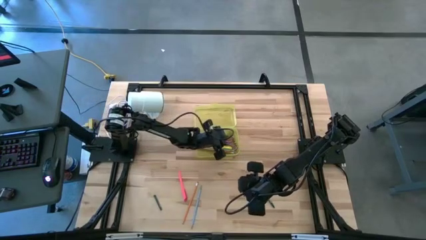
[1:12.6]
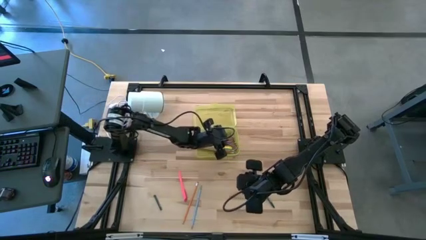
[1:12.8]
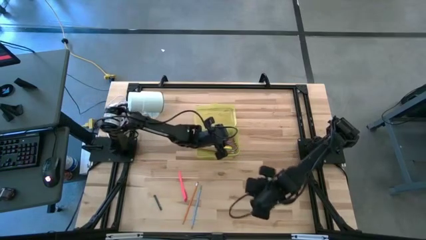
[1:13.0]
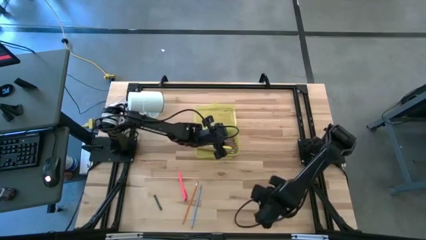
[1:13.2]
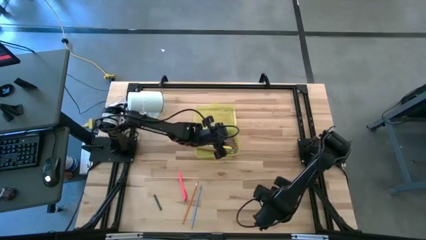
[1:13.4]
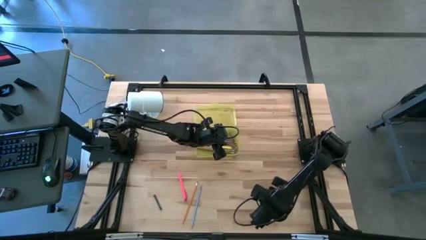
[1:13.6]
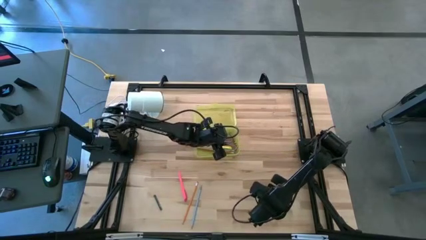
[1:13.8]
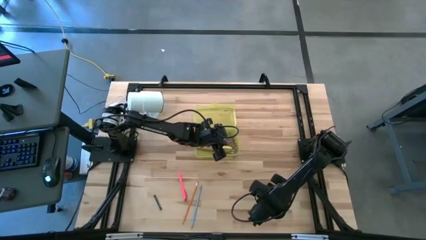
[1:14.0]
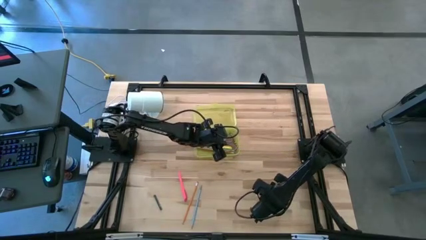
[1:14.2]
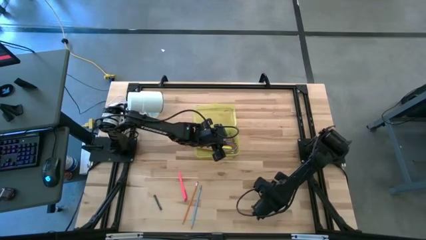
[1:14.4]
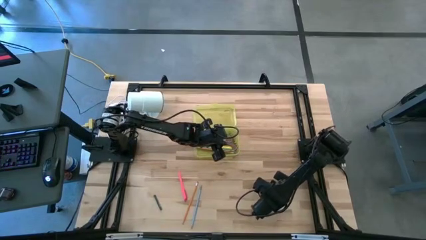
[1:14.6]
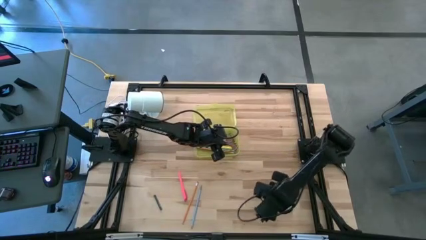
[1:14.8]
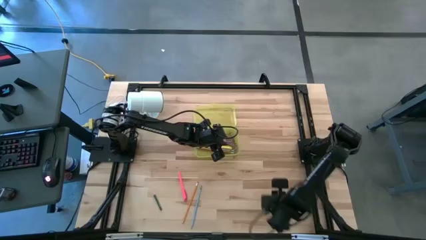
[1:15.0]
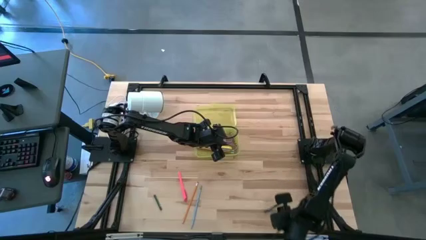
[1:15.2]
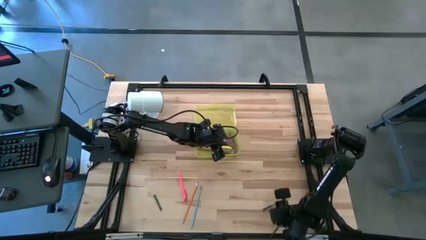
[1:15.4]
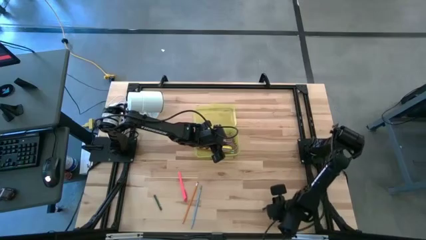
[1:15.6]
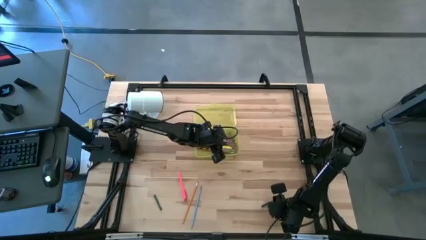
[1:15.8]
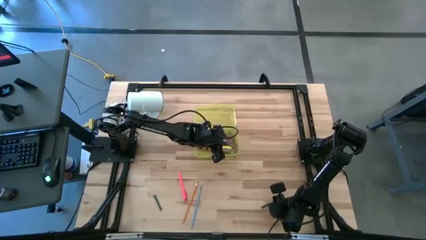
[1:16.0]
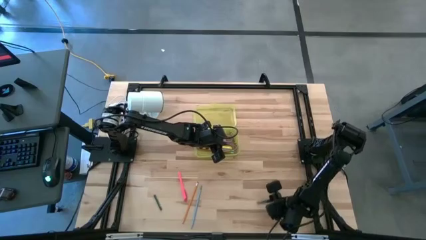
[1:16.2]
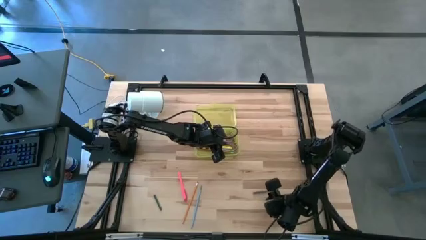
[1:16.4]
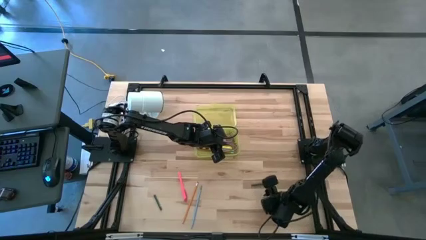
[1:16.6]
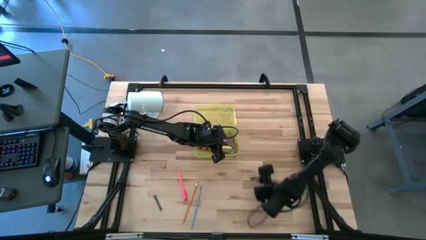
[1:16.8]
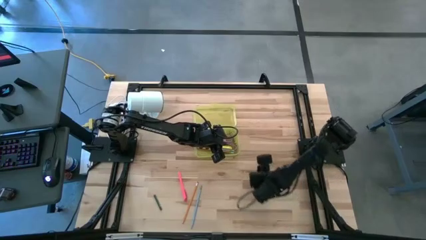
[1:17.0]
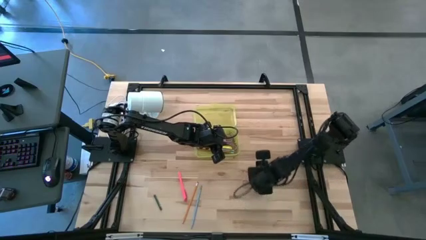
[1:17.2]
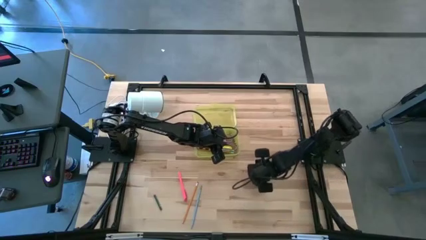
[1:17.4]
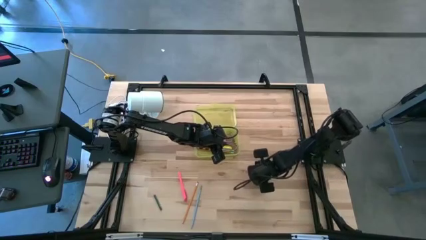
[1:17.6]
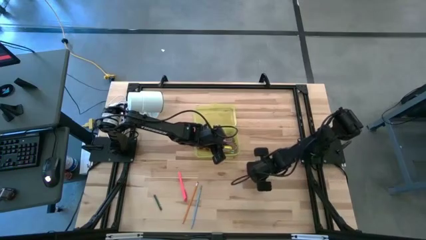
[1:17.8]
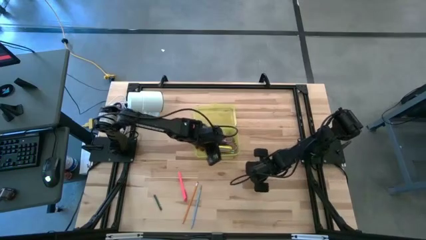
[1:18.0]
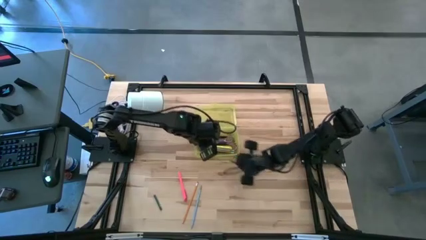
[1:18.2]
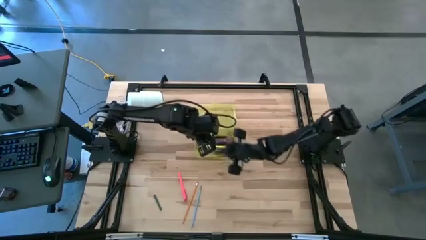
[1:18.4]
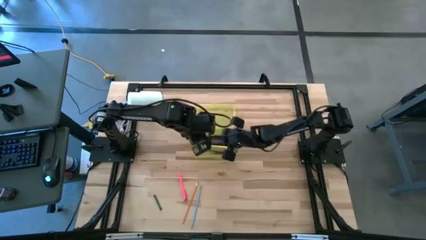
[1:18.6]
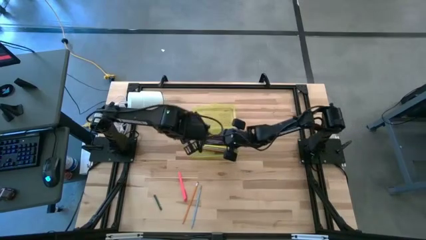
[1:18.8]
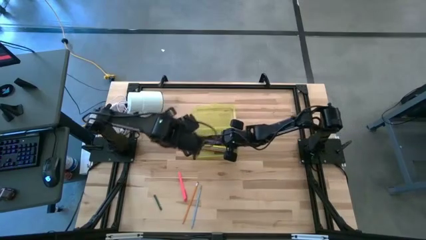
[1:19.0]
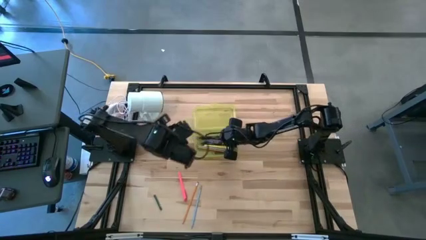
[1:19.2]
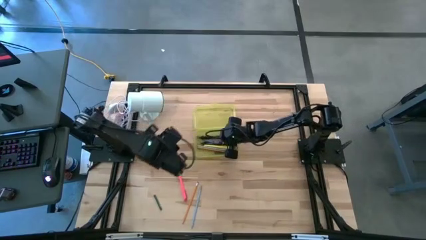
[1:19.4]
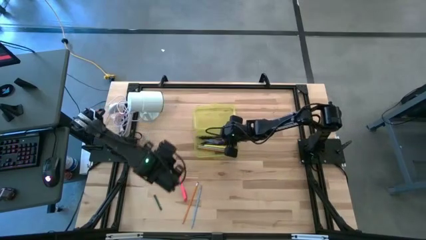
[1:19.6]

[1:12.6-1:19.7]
Task: Pick & place school supplies into a supply box
Put the dark green crayon into the supply box

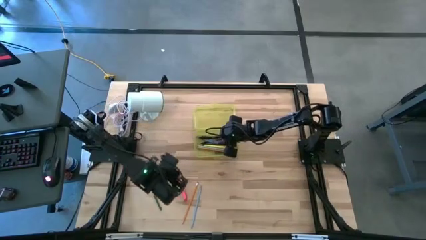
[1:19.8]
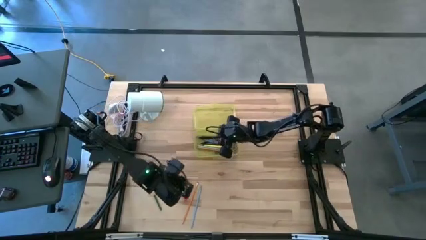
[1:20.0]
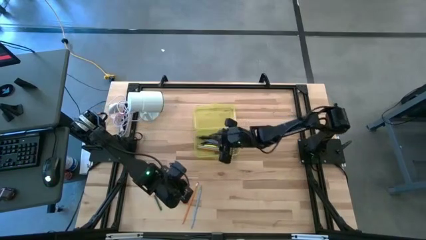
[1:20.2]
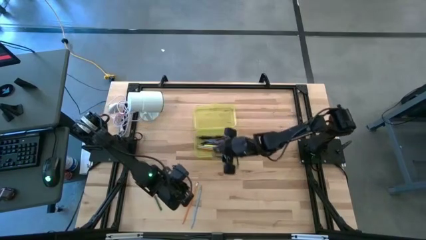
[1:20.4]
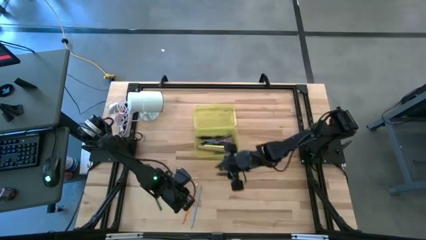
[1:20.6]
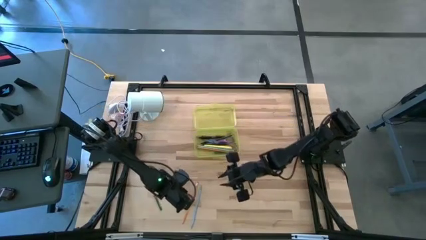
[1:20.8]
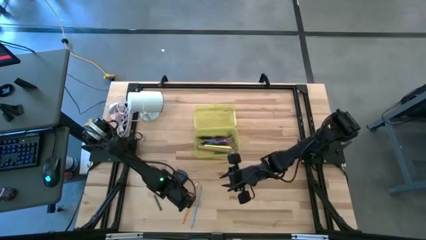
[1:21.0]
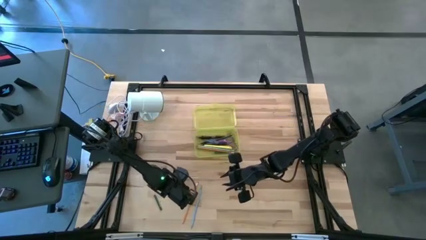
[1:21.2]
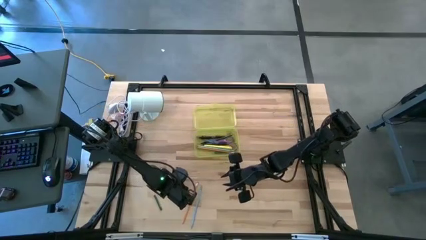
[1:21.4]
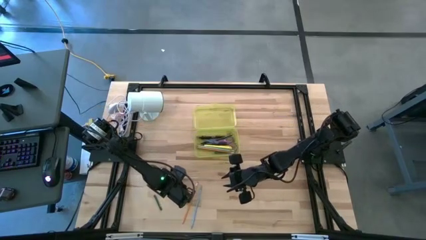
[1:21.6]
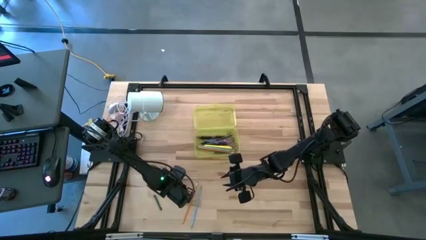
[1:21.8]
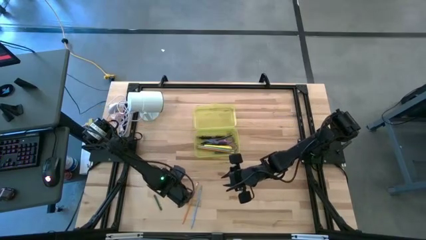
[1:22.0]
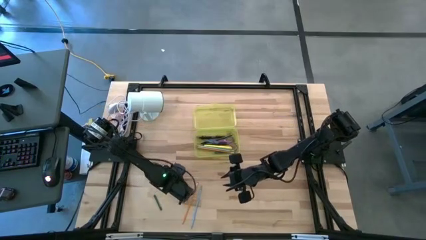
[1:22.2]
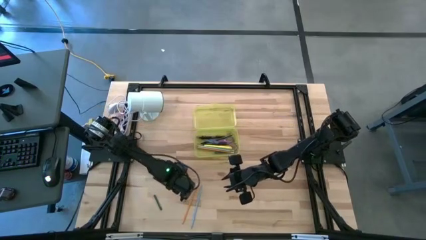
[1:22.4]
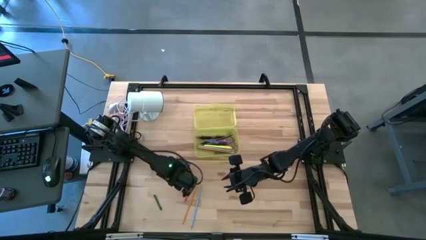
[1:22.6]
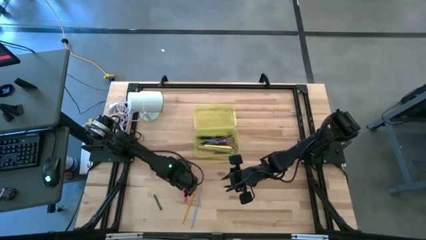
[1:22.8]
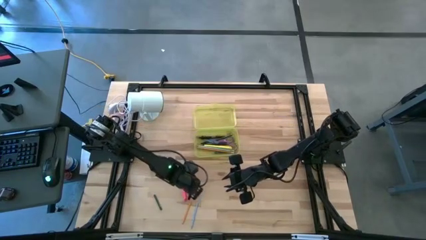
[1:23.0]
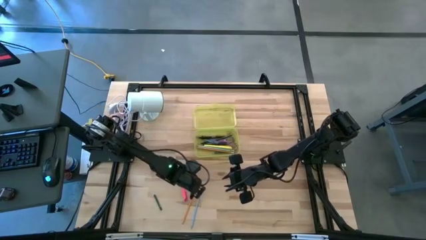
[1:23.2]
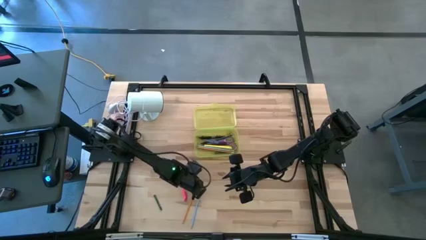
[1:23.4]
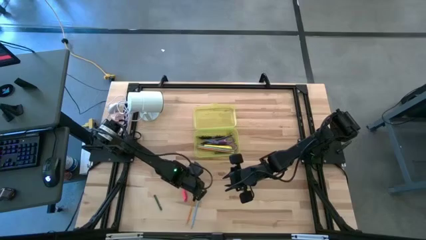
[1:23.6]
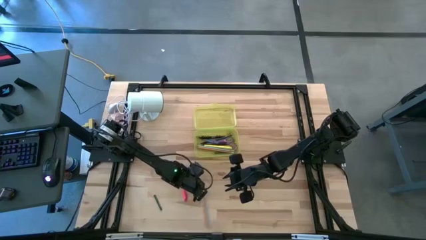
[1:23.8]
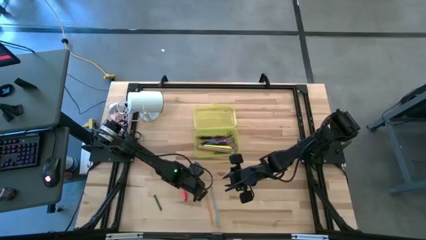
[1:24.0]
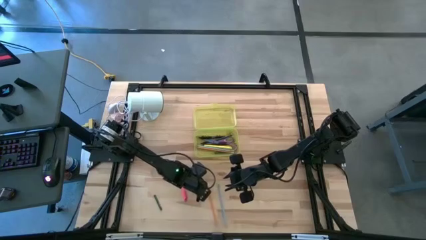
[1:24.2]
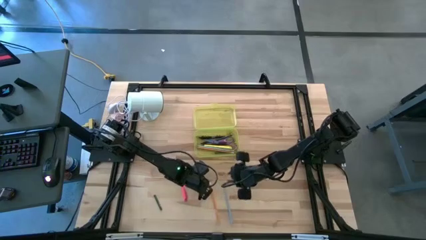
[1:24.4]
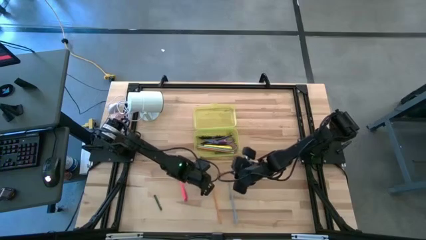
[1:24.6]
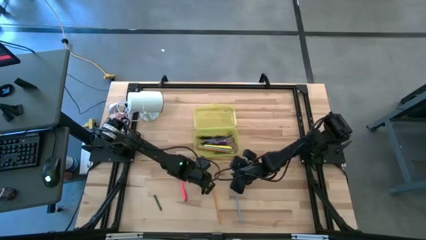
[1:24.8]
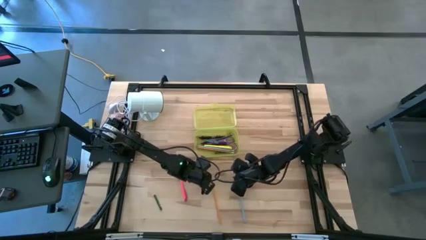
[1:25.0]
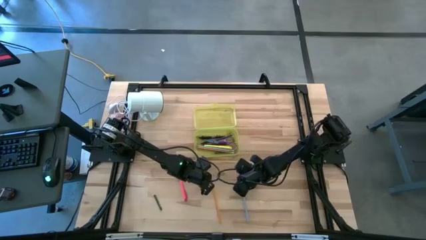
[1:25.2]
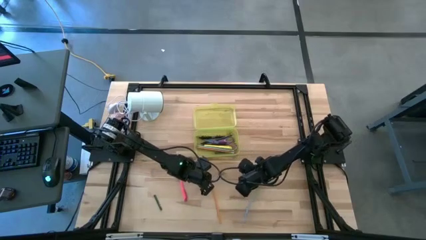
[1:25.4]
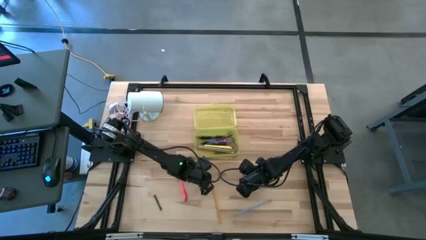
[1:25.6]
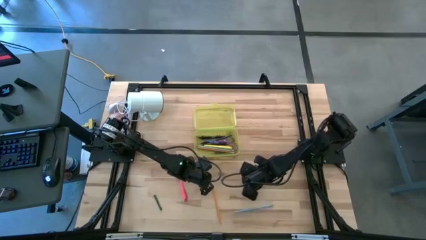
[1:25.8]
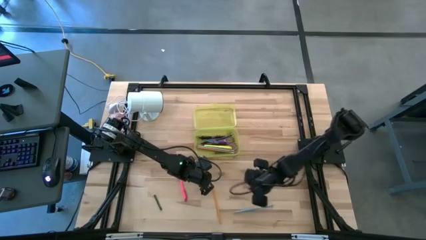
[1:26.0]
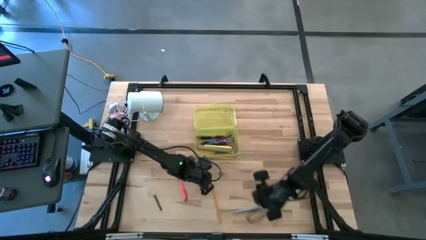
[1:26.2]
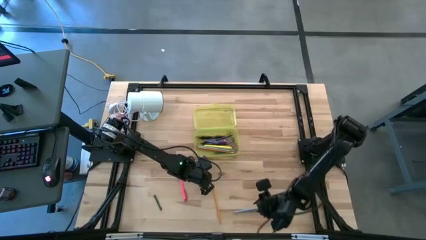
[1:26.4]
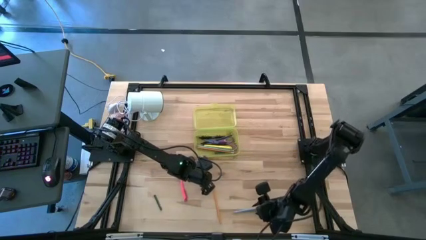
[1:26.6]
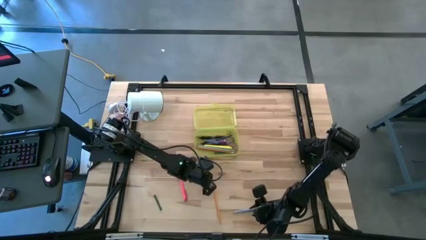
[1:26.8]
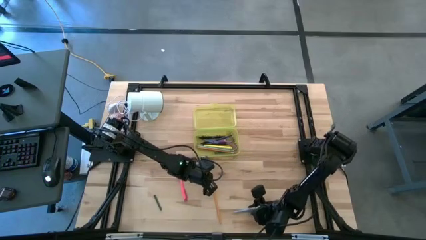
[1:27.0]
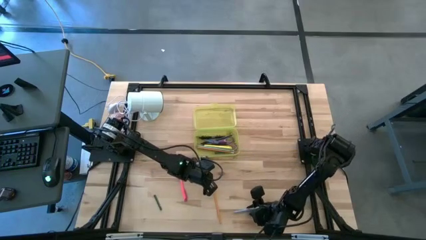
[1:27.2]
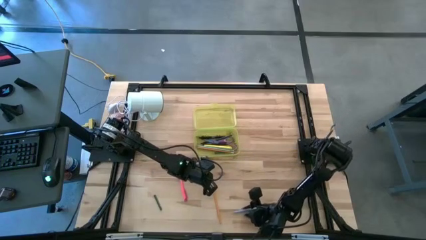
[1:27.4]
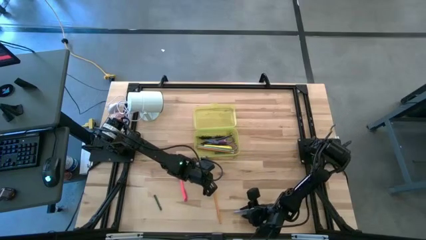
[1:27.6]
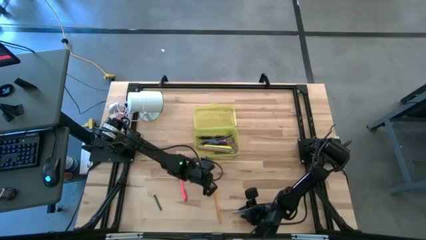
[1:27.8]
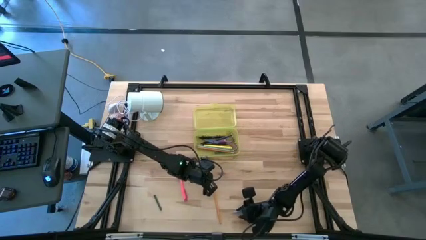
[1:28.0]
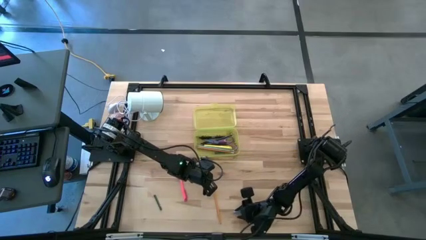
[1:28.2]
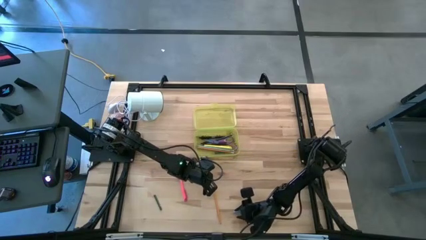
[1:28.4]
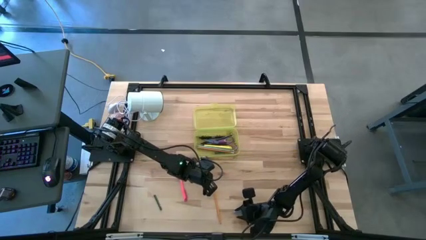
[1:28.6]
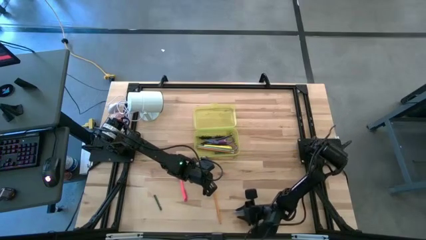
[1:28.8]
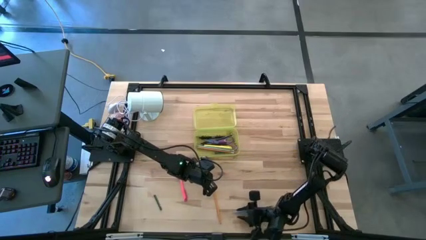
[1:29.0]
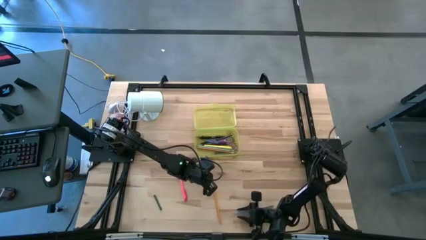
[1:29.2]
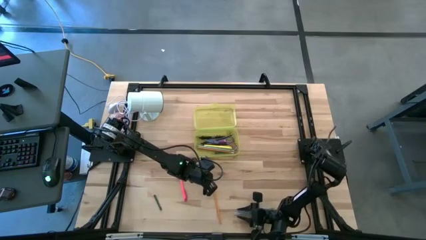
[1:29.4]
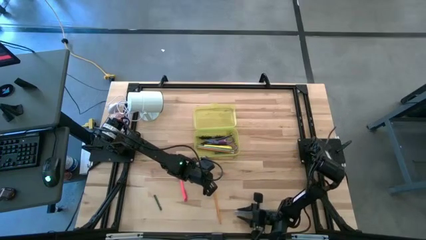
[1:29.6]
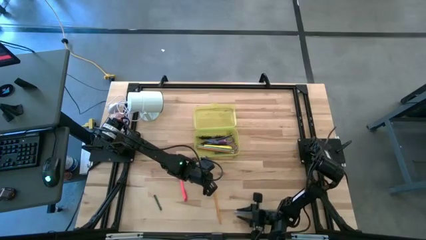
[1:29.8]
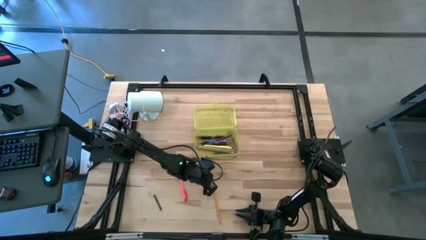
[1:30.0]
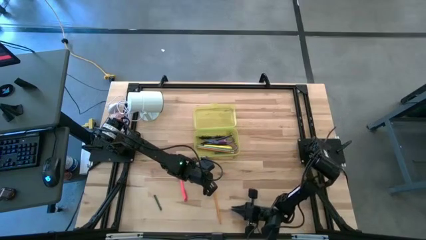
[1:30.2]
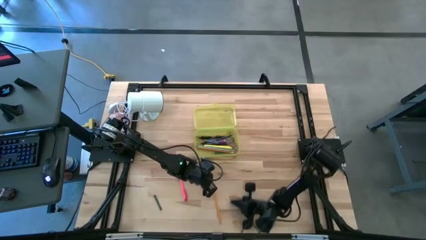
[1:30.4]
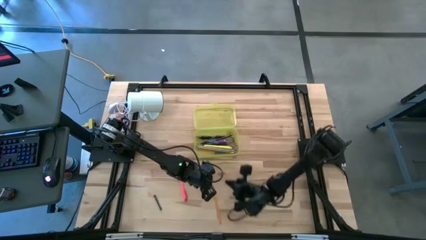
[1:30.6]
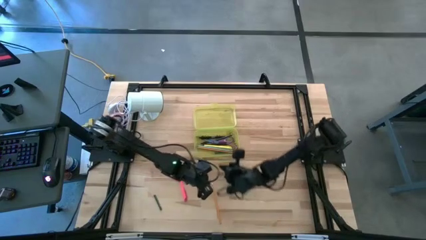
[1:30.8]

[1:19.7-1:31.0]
Put the light blue pencil into the supply box
